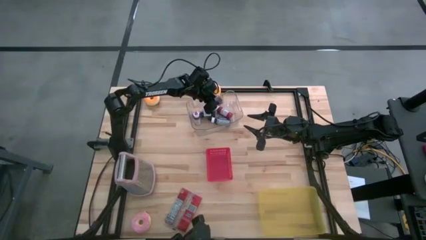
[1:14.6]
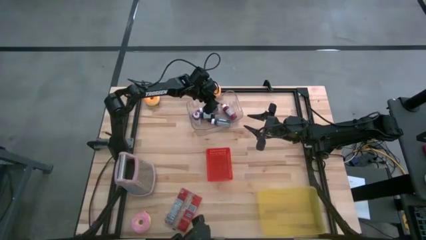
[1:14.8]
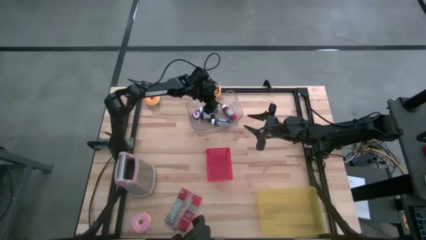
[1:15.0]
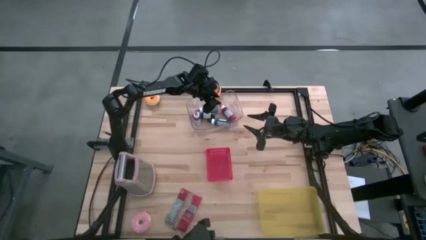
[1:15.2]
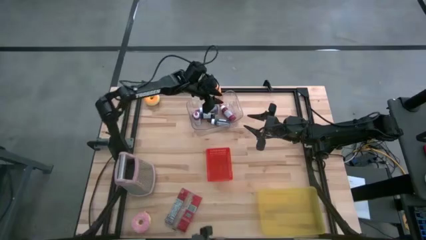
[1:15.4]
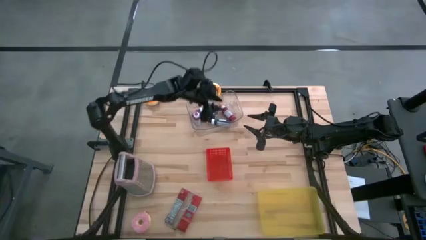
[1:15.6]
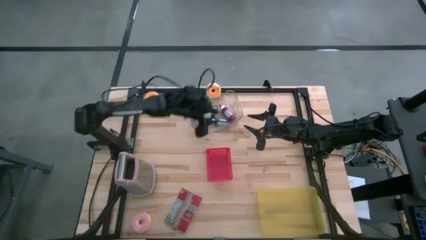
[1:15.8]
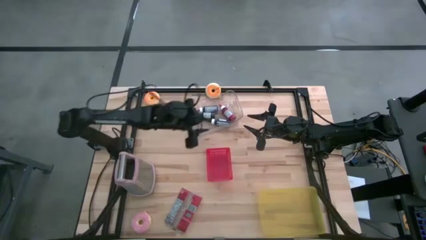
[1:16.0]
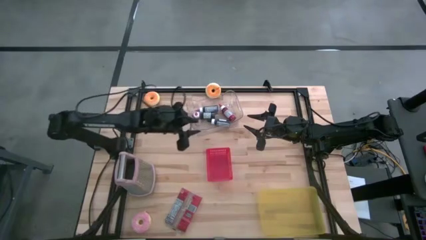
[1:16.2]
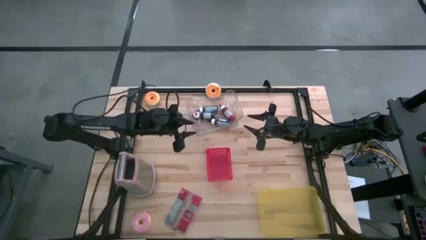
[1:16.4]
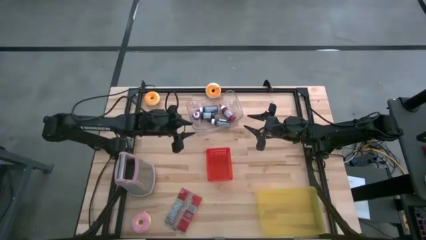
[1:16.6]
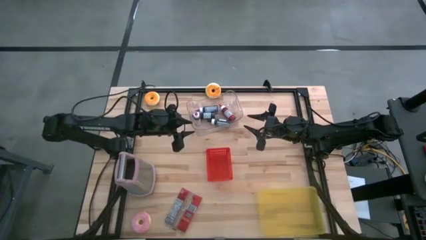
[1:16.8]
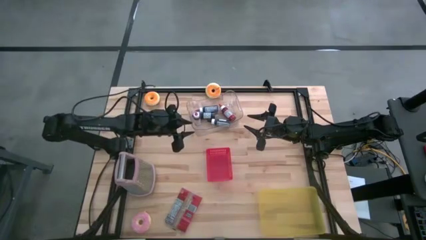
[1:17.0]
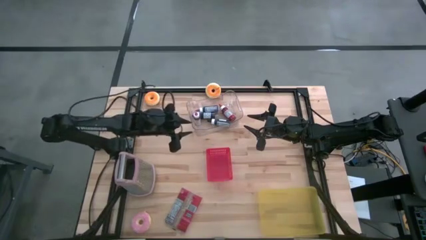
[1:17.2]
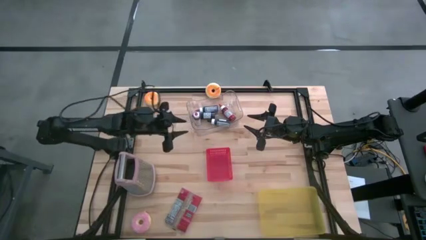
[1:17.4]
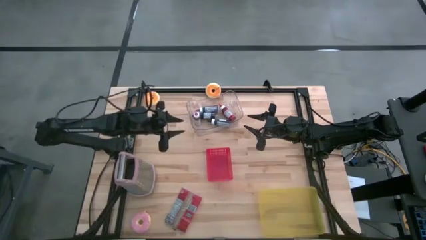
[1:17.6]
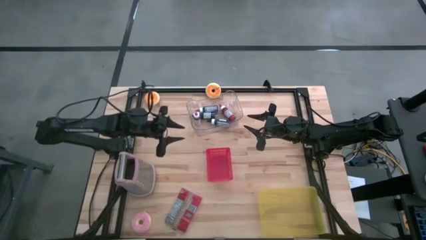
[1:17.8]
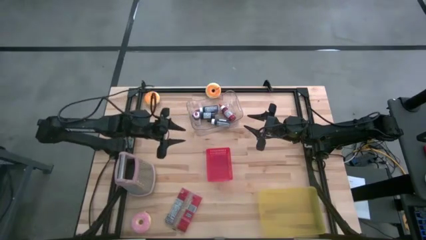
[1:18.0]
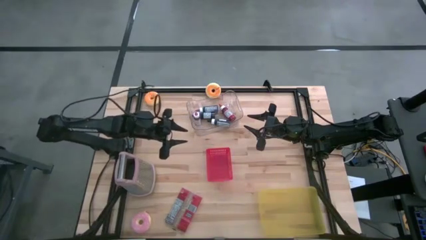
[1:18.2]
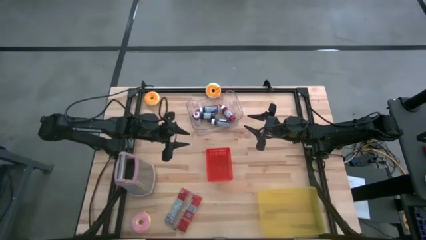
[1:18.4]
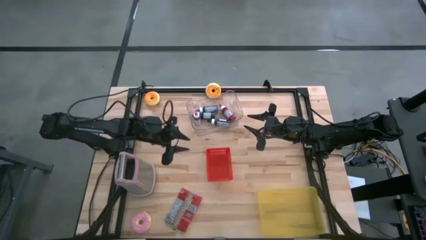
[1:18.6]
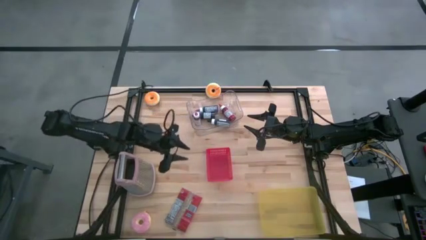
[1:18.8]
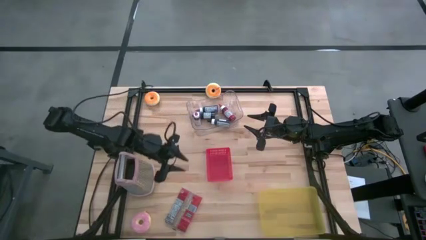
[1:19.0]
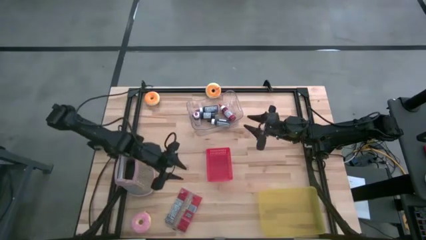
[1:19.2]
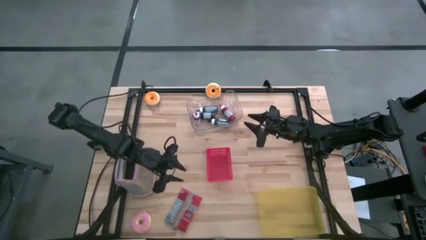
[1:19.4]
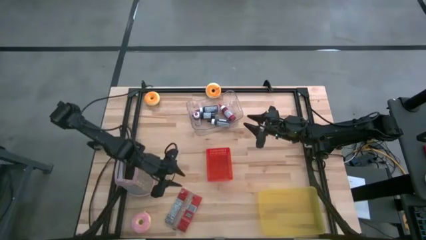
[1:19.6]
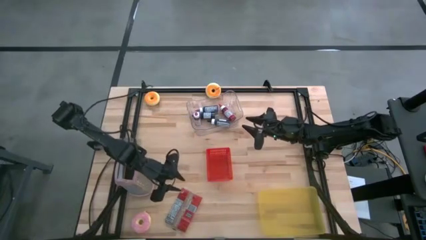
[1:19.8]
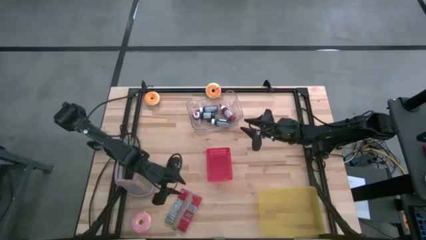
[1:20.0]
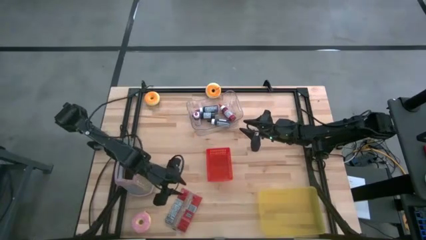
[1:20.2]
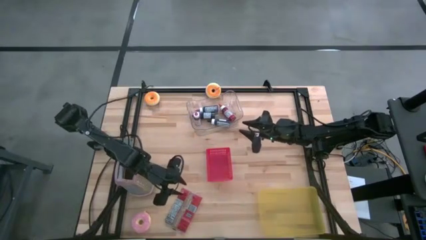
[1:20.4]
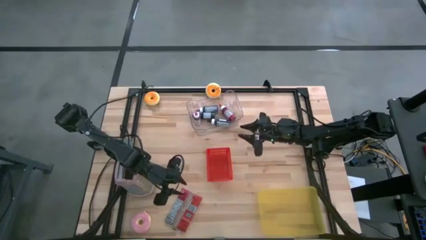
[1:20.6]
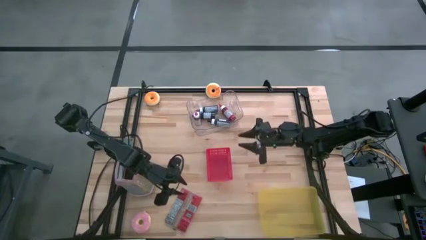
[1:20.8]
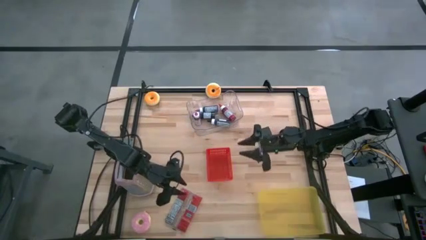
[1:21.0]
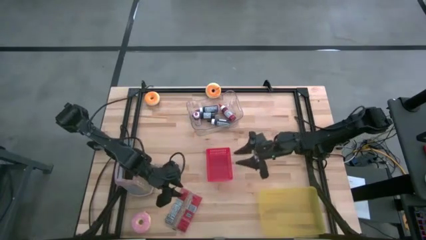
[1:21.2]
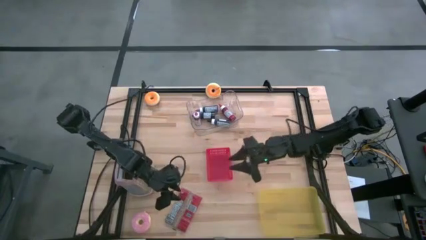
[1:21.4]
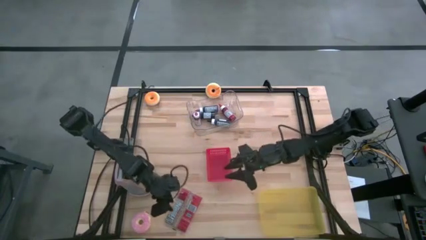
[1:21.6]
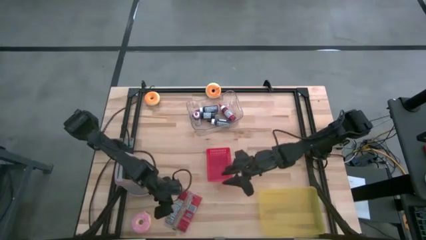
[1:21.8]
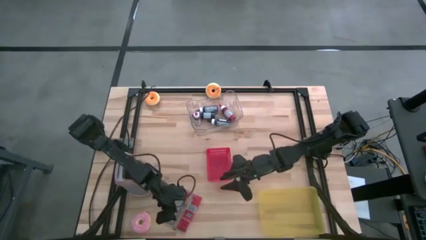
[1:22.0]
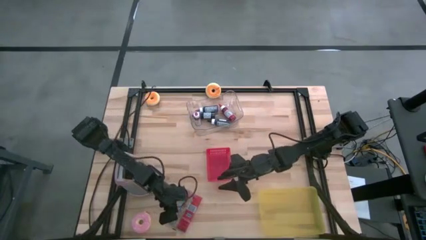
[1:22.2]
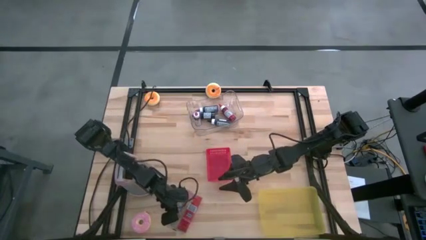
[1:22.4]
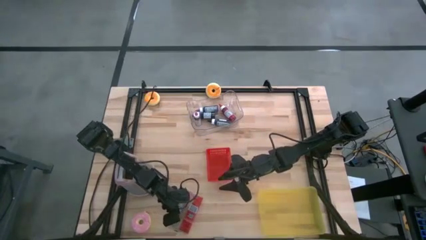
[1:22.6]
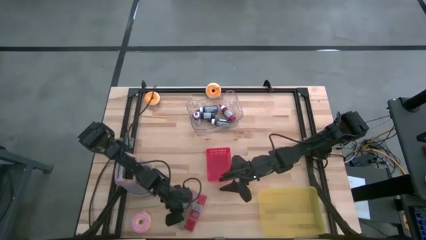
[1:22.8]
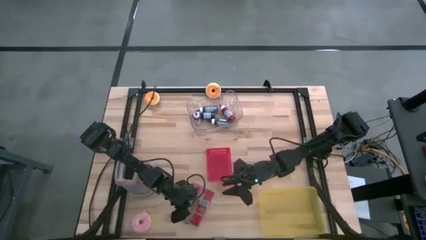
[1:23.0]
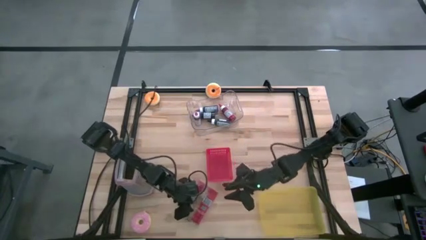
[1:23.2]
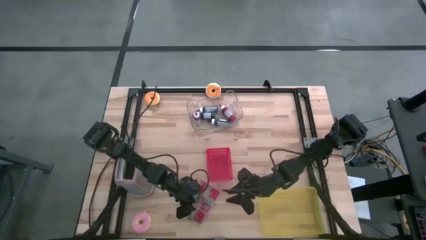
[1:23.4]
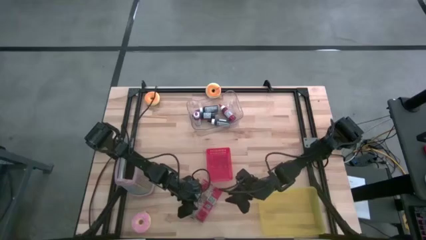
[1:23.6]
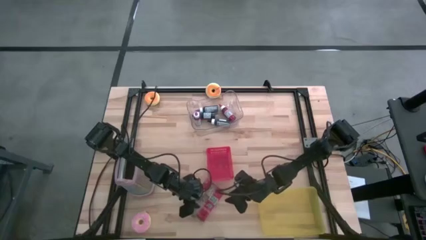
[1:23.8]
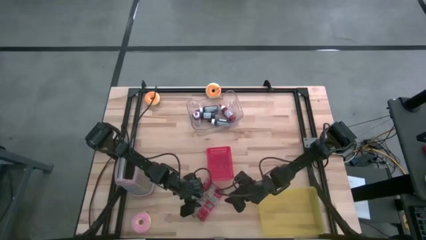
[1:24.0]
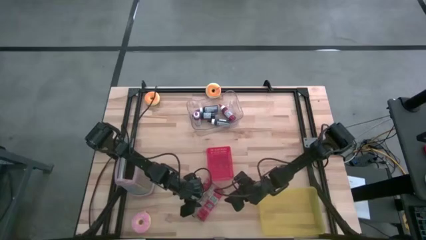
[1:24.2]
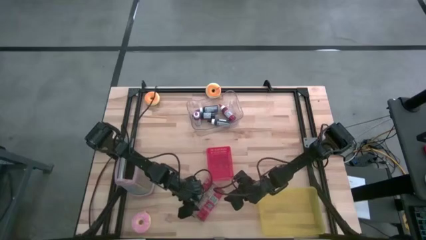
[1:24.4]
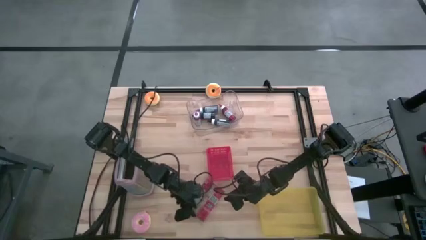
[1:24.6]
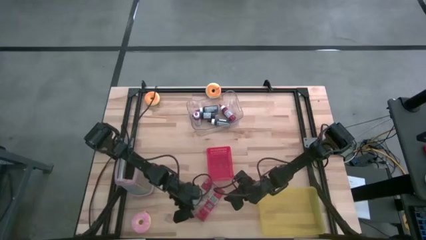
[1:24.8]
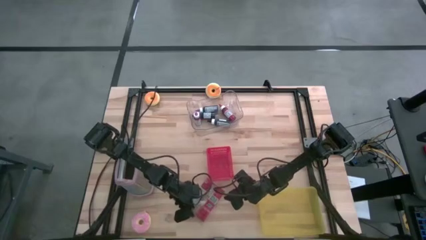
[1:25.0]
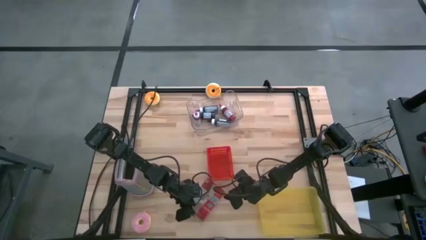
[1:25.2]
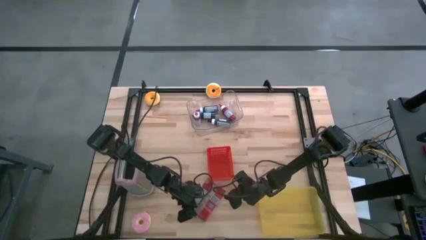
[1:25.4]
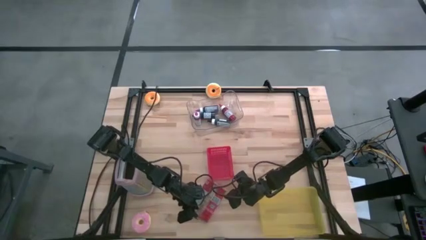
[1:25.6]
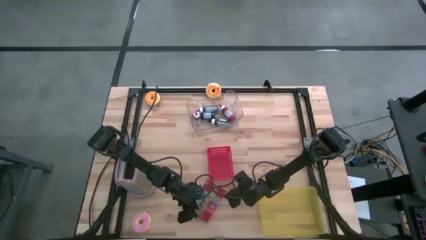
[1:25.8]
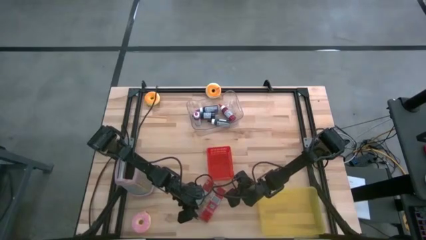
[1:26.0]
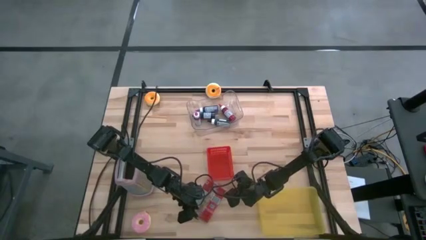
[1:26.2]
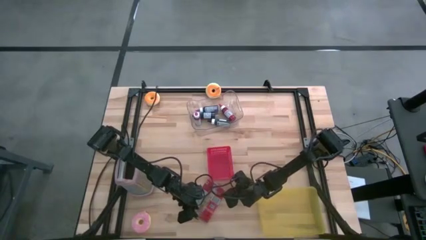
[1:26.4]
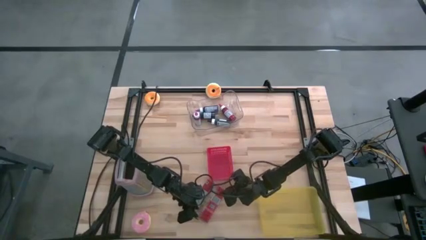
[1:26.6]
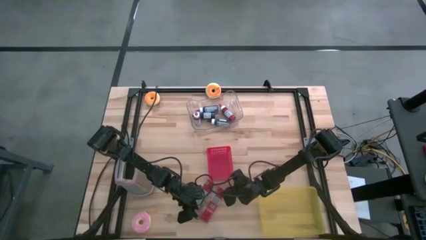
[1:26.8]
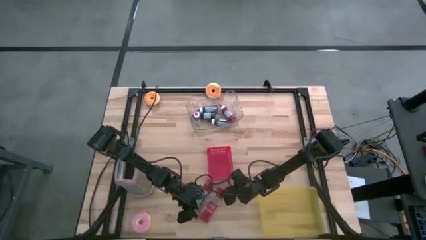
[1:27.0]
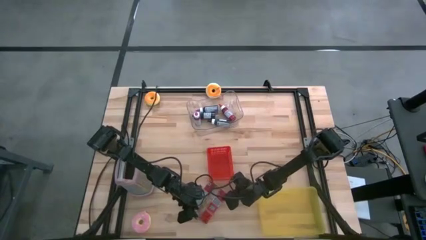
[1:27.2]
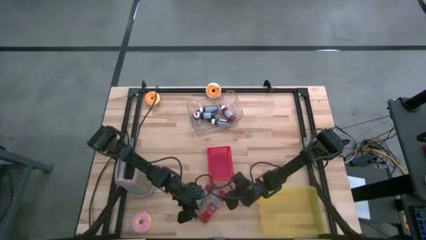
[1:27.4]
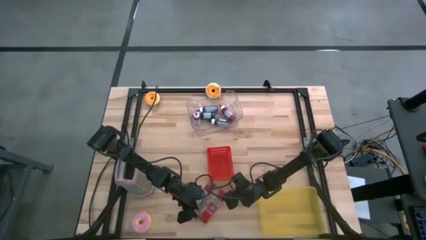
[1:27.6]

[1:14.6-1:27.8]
Task: Pick & Place Food Item
Put the red popcorn bag into the yellow bin

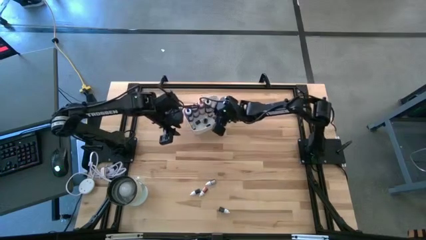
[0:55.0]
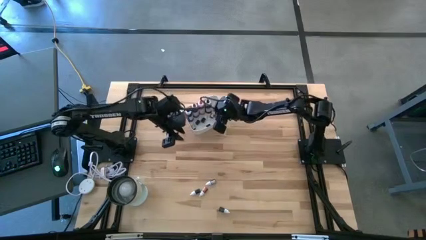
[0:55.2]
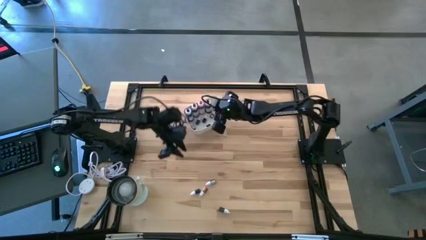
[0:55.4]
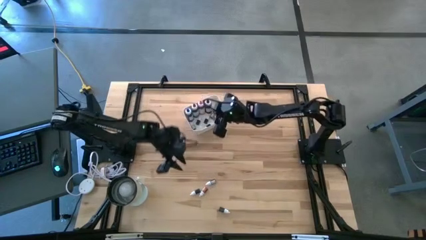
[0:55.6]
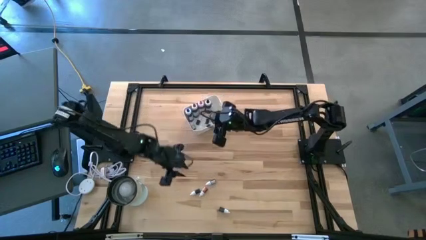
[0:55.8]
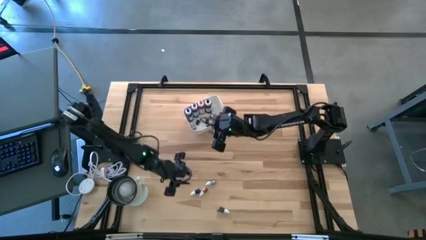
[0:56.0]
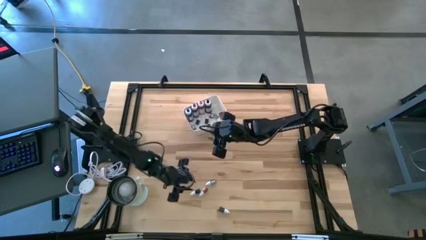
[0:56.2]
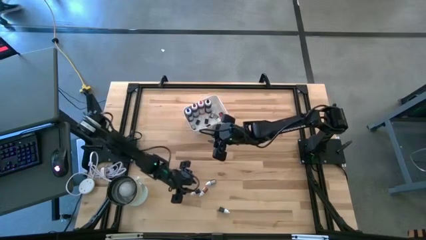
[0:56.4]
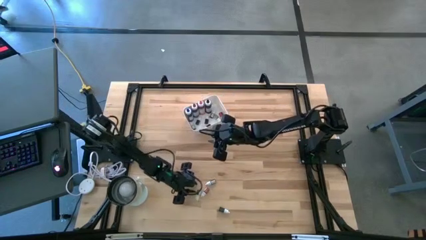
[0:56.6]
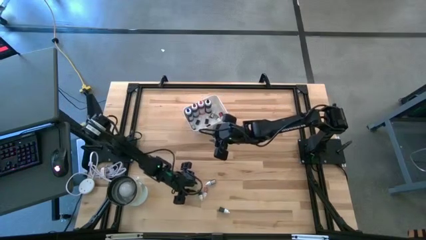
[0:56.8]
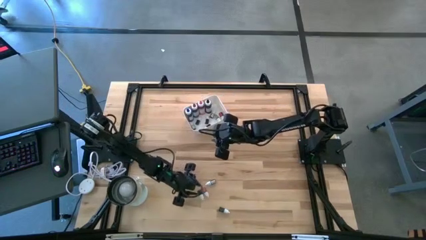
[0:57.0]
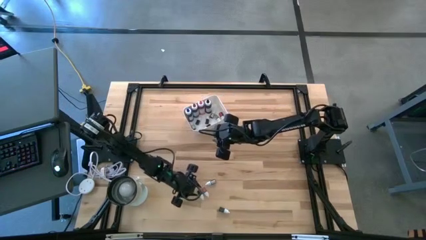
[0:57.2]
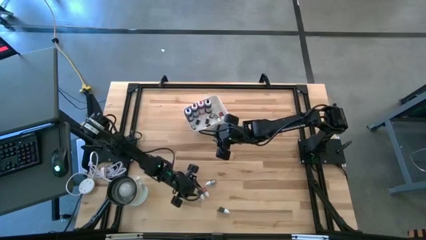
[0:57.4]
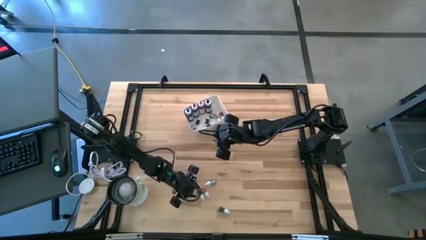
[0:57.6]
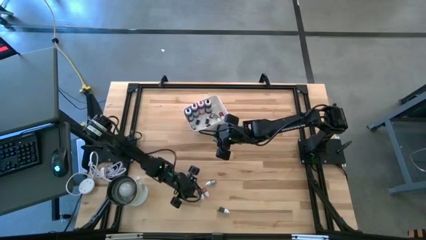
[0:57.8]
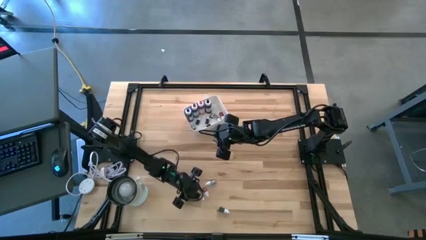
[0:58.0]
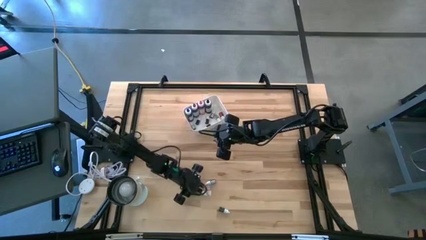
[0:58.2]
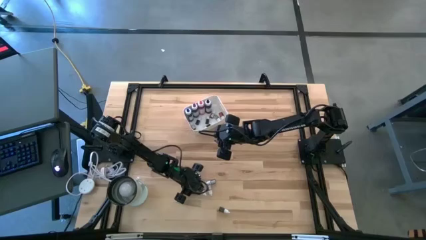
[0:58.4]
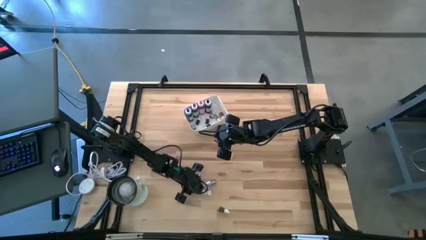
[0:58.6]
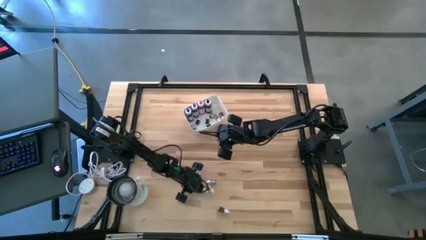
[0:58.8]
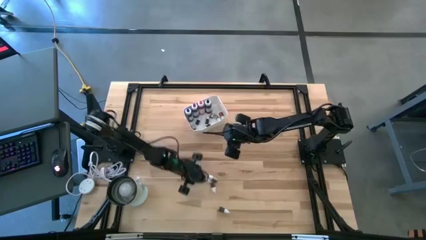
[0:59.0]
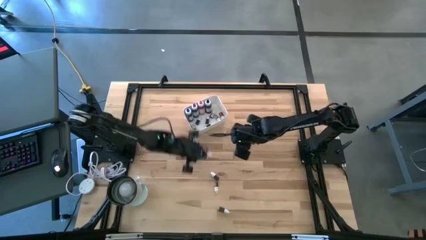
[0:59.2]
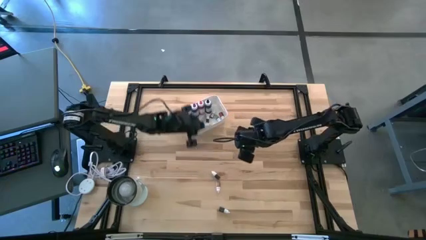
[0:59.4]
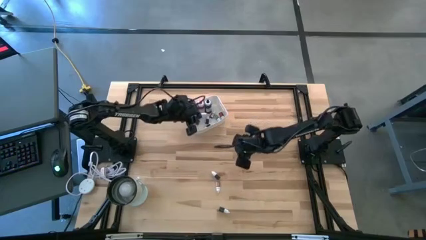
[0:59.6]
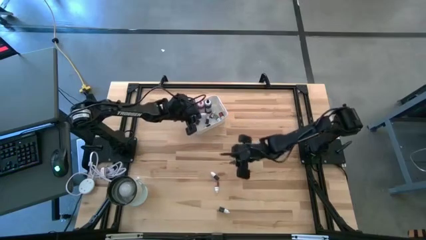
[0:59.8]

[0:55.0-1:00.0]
Task: Pick & Place food coloring
Put the small purple food coloring bottle into the white bin
